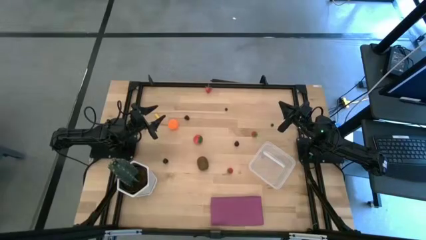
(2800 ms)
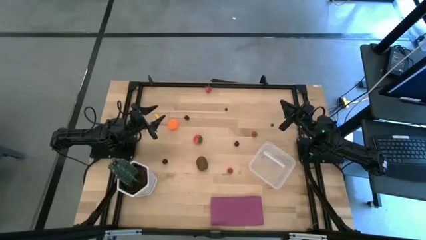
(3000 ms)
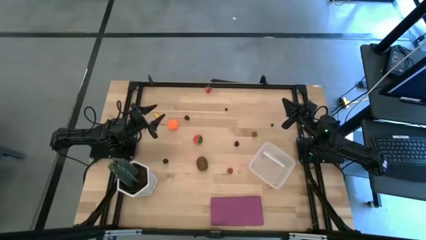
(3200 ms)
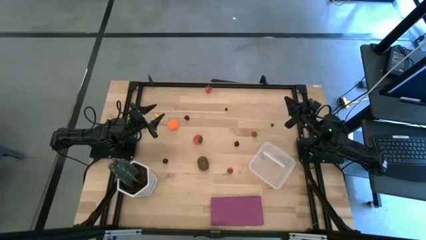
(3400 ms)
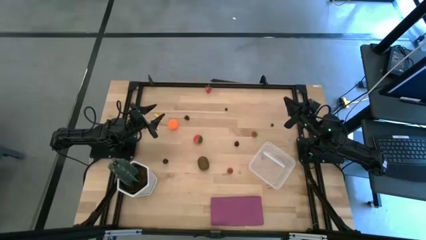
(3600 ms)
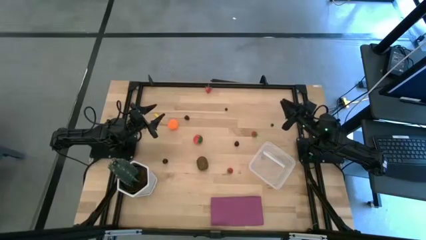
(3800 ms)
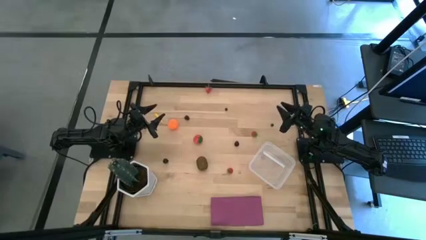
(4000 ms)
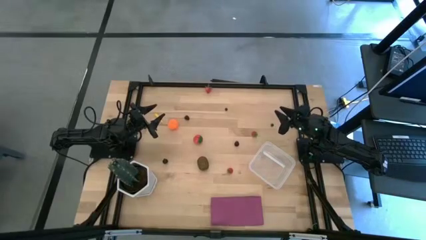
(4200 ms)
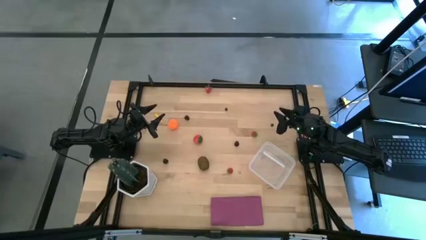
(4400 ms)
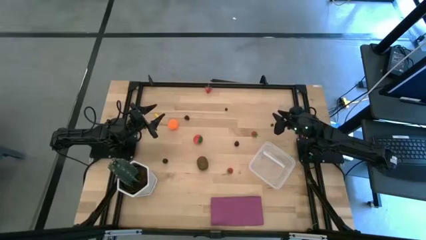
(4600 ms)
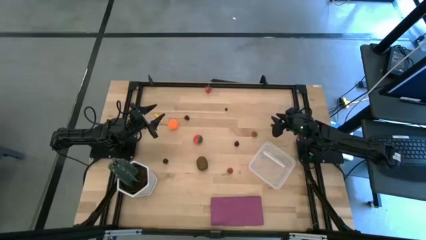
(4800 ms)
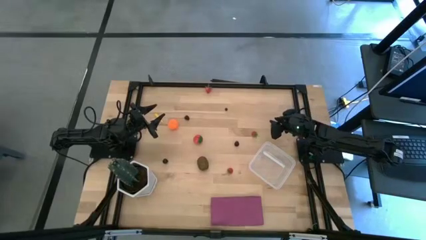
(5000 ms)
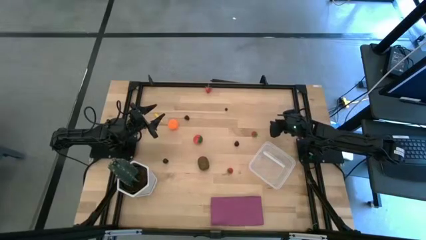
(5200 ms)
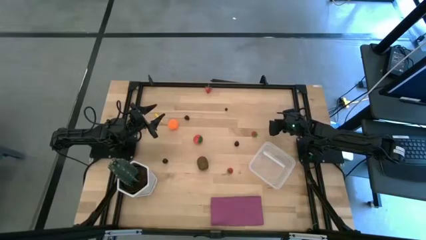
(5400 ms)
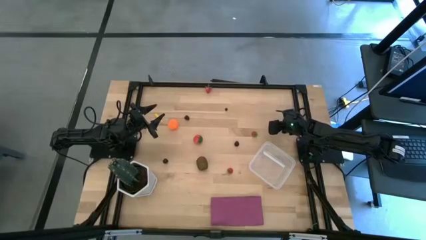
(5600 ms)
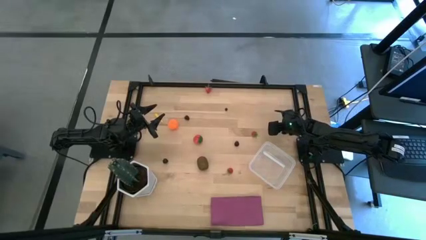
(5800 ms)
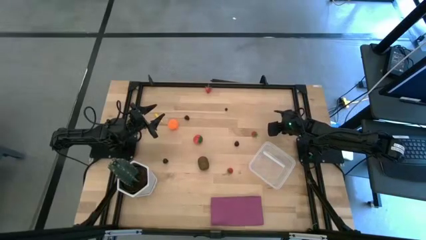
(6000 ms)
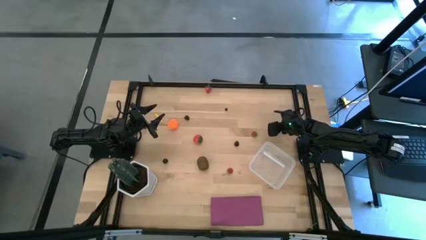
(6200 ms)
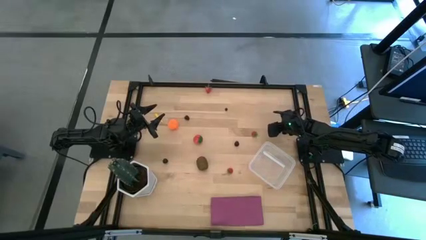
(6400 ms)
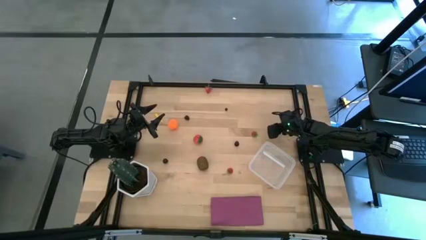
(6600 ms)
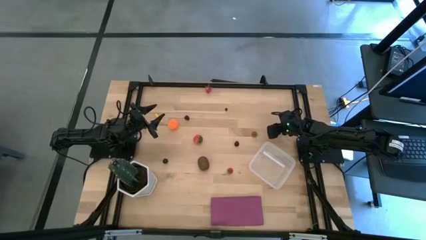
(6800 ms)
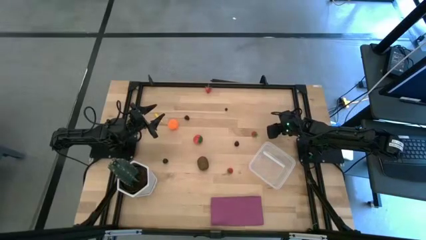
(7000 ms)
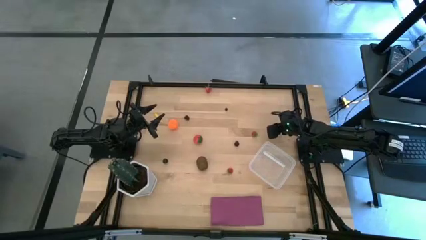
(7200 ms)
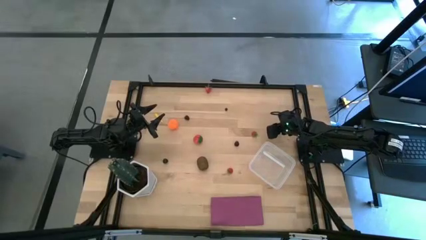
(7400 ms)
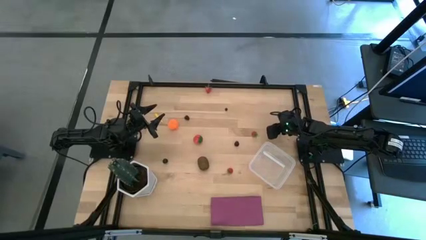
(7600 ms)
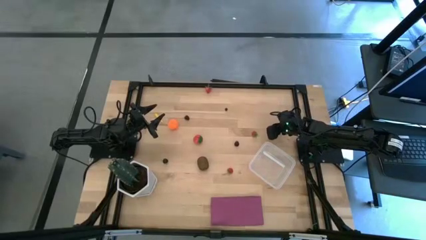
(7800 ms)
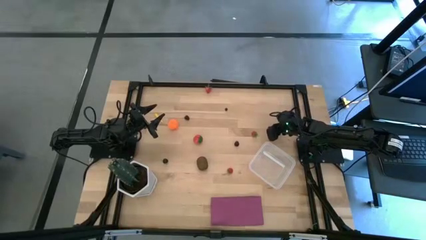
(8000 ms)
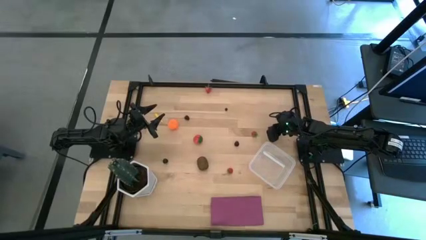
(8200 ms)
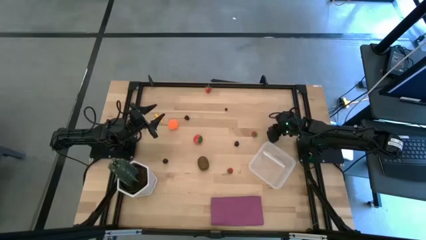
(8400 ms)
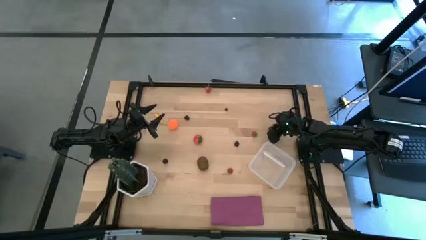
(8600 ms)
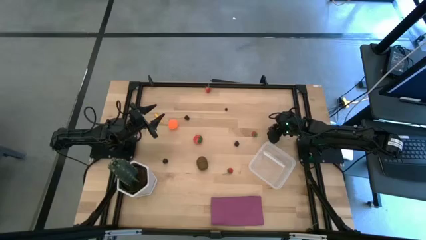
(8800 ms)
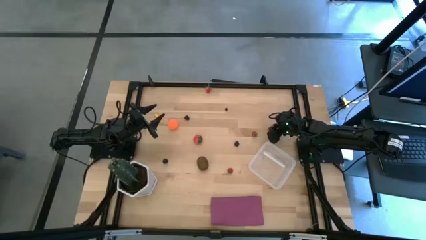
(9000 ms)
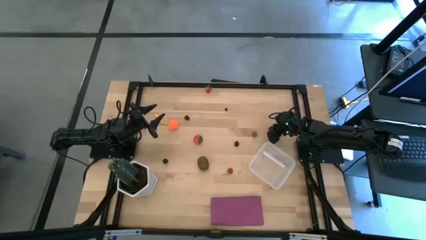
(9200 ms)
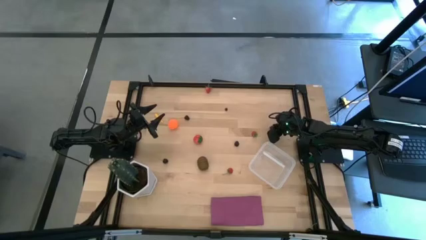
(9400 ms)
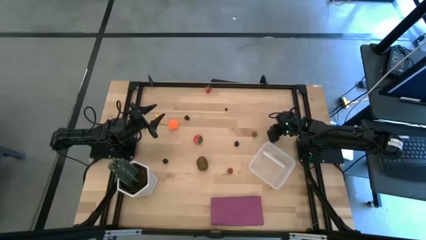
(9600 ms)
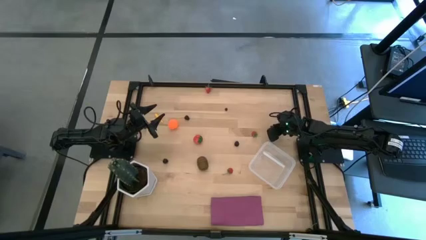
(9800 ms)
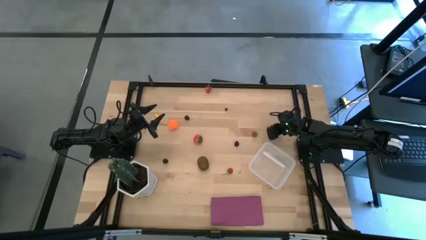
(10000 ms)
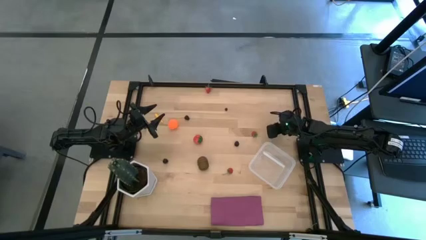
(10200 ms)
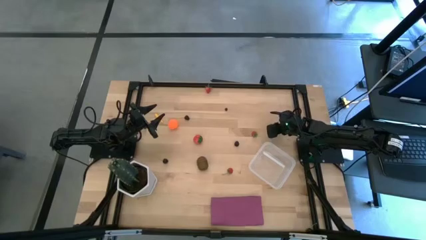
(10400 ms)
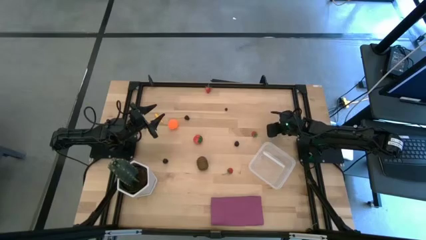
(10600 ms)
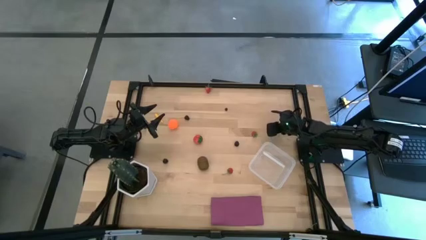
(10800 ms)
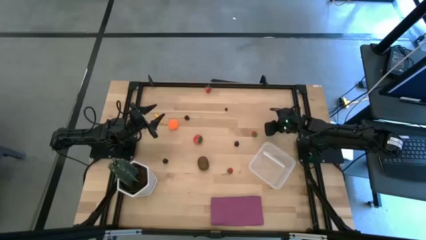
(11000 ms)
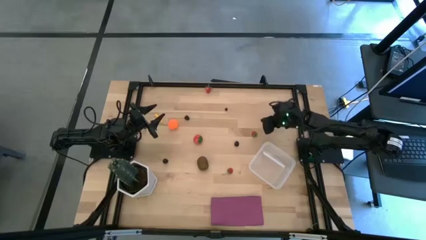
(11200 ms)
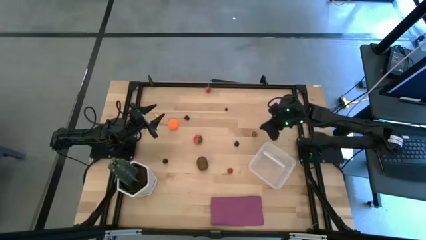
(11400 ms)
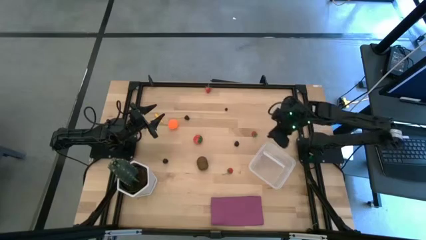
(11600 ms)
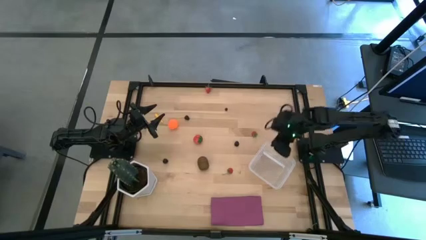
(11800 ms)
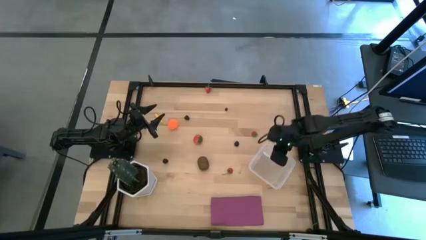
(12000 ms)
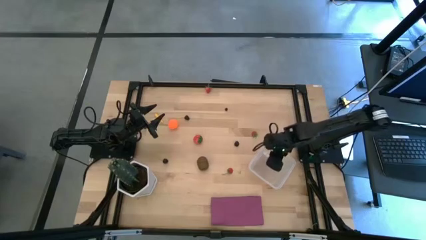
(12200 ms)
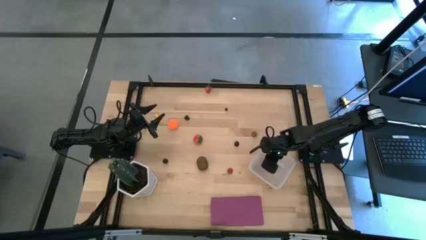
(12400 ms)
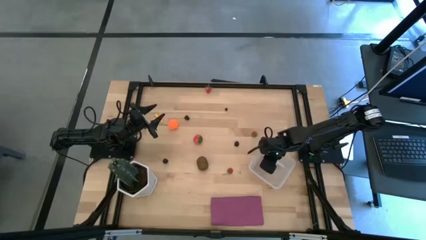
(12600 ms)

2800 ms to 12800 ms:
Task: Pick and placing Produce into tupperware
Put the blueberry into the transparent bin

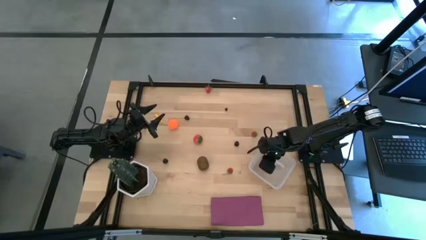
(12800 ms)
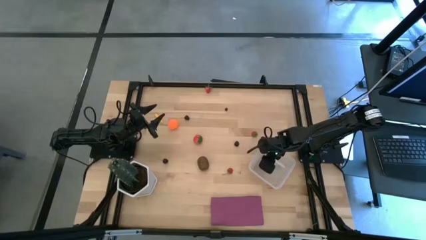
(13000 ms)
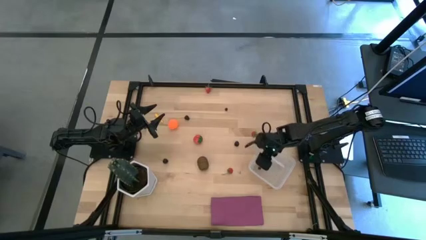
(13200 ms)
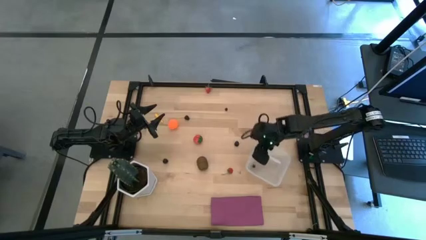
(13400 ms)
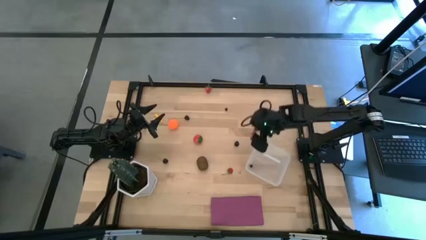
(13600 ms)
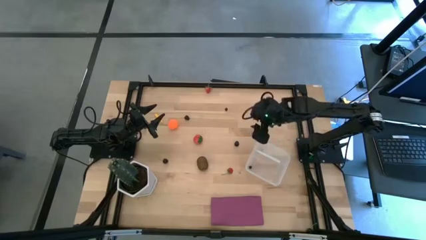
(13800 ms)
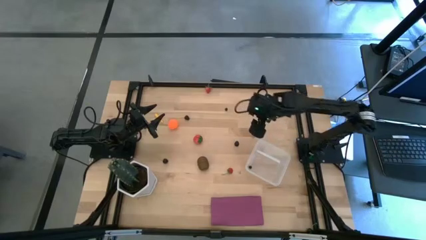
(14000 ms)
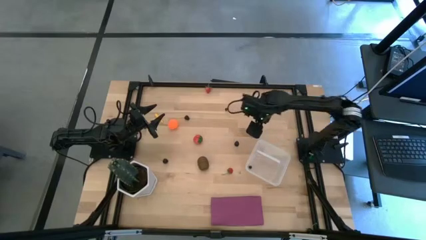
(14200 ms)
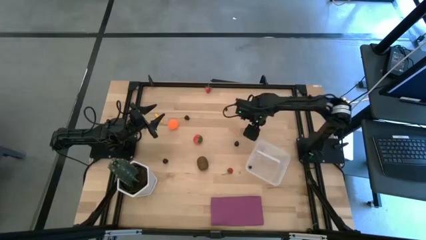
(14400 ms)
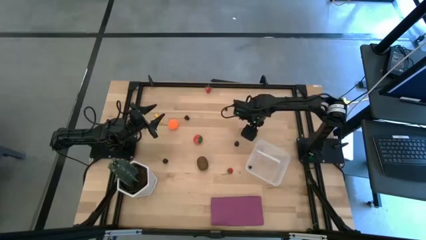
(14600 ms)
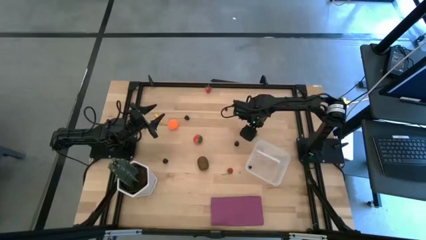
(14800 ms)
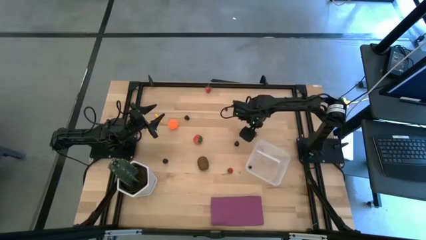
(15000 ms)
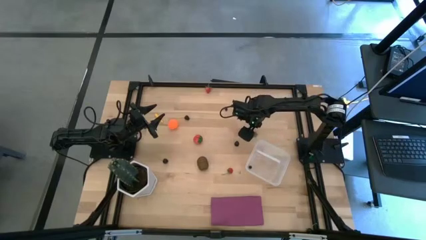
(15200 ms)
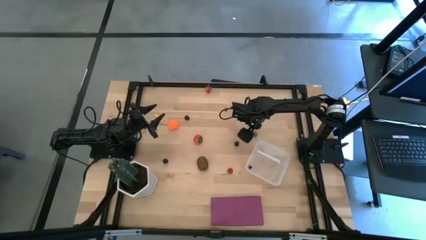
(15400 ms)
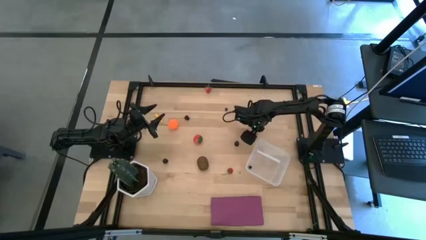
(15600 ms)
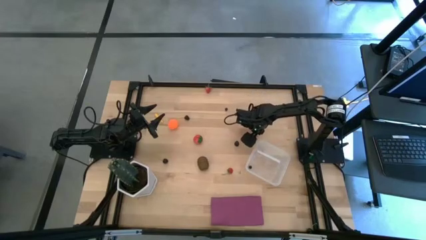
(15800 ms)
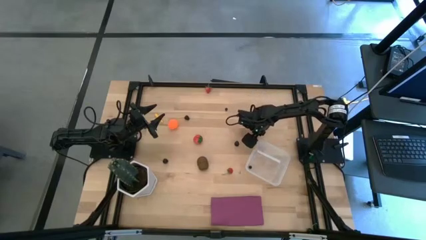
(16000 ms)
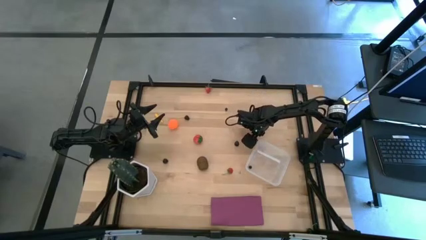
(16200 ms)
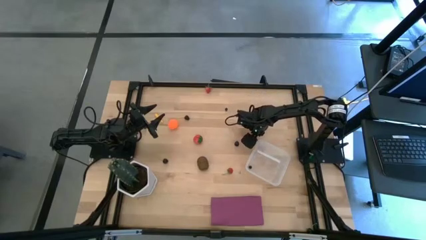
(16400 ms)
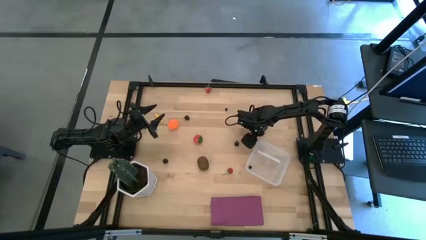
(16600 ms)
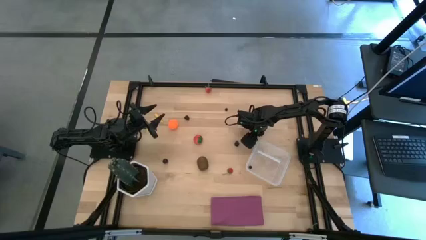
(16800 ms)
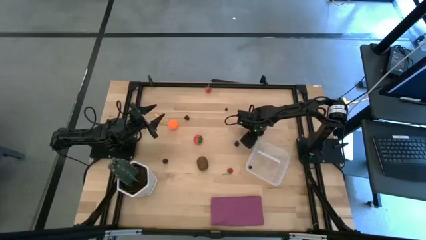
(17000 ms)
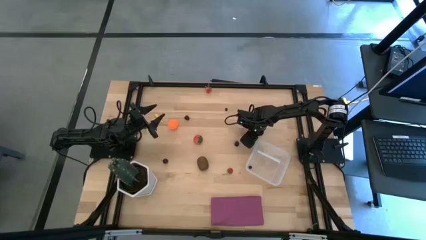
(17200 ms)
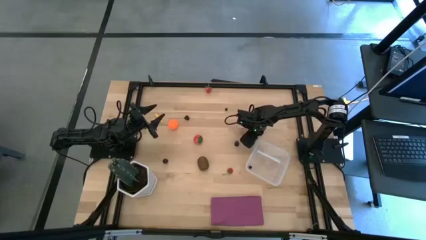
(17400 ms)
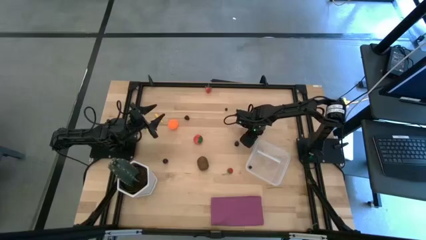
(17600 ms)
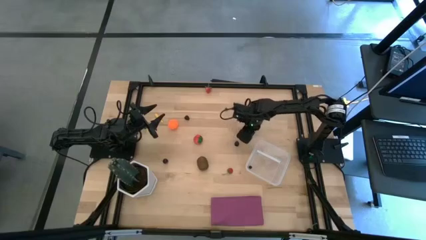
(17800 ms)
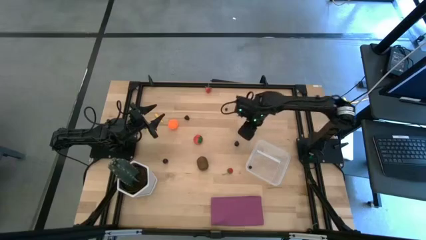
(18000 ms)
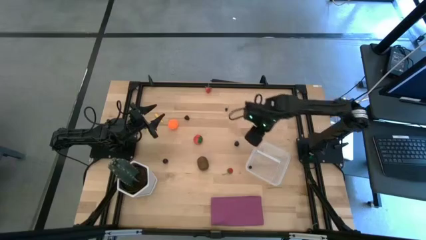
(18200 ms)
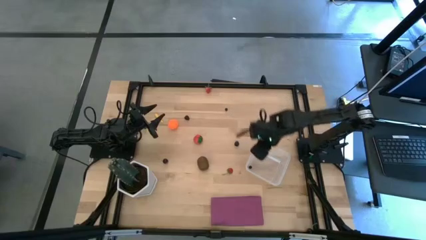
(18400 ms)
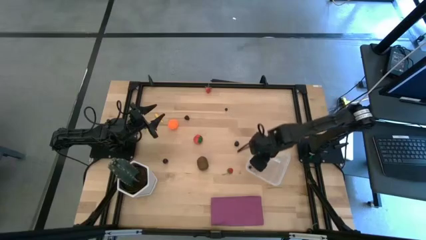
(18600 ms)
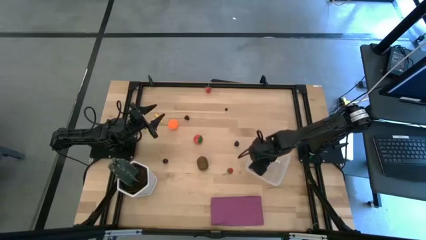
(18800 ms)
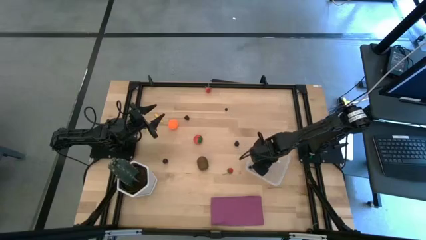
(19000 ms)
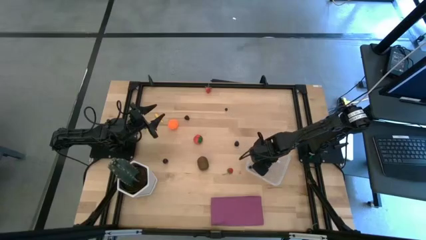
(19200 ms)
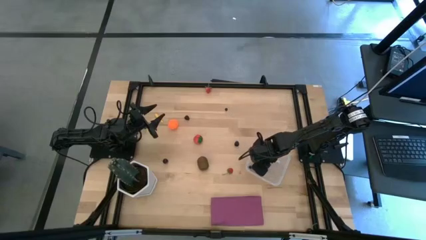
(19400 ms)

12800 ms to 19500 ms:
Put the strawberry into the transparent bin
